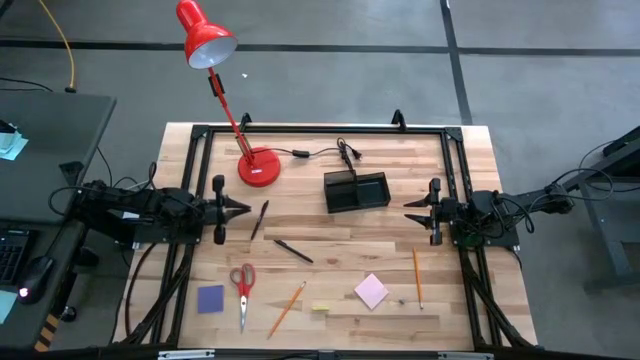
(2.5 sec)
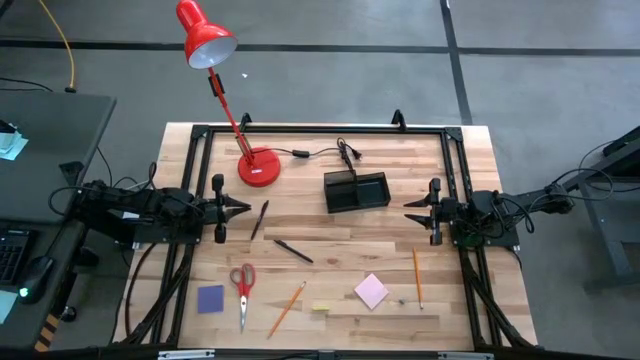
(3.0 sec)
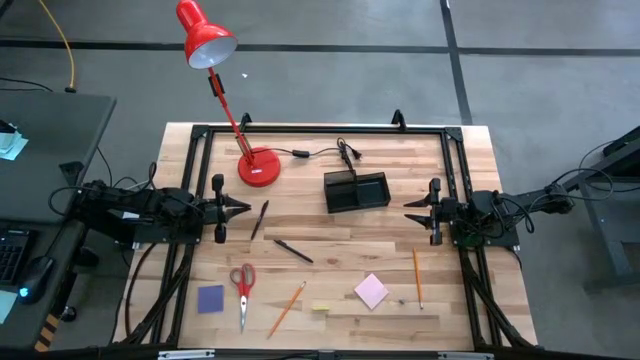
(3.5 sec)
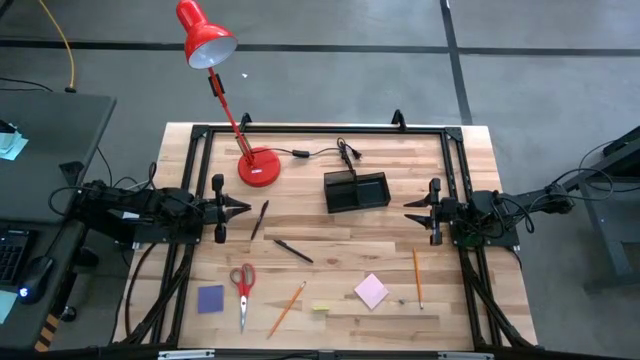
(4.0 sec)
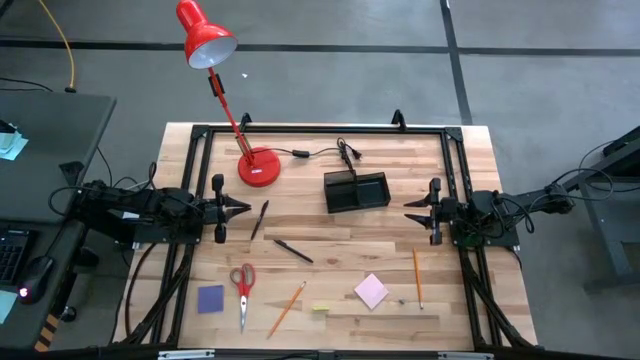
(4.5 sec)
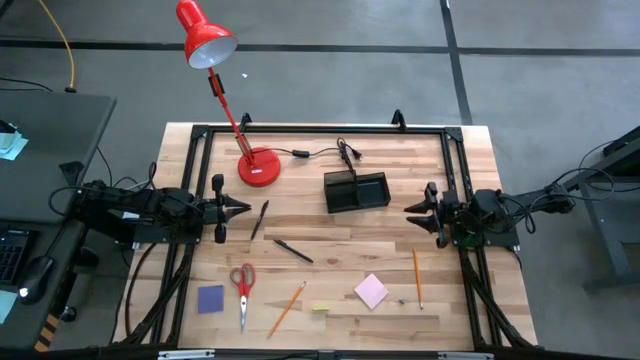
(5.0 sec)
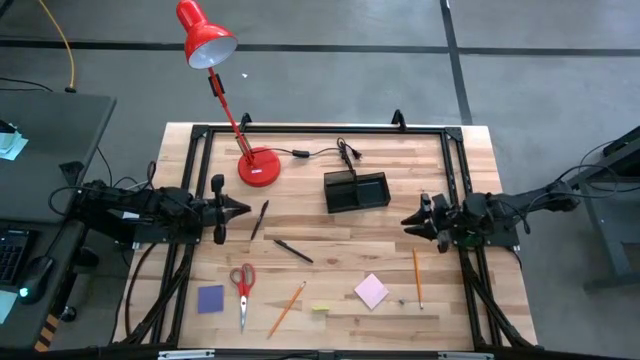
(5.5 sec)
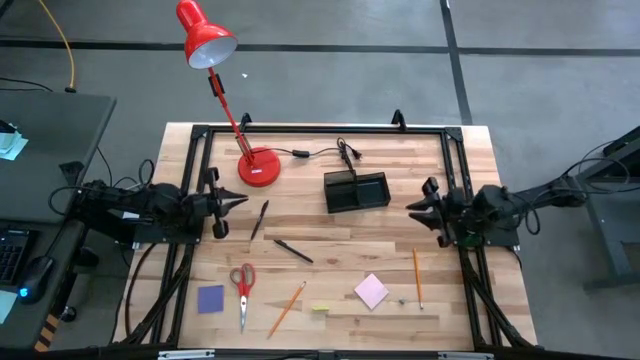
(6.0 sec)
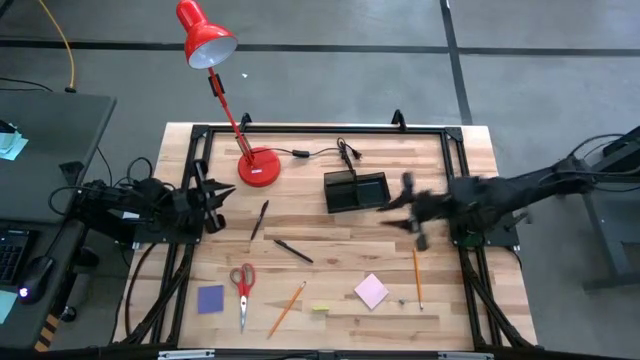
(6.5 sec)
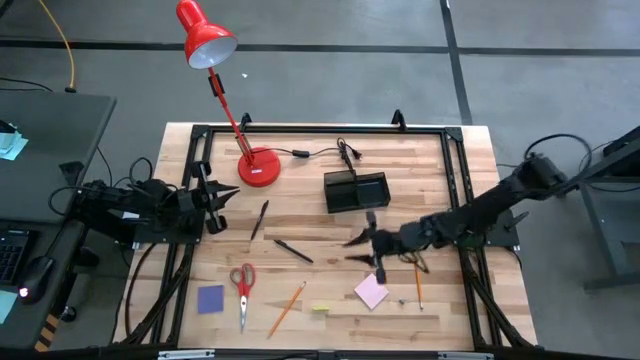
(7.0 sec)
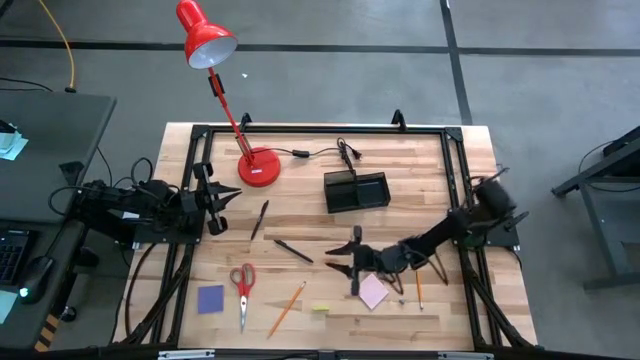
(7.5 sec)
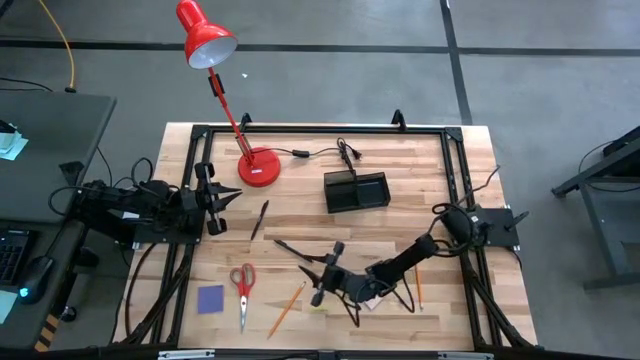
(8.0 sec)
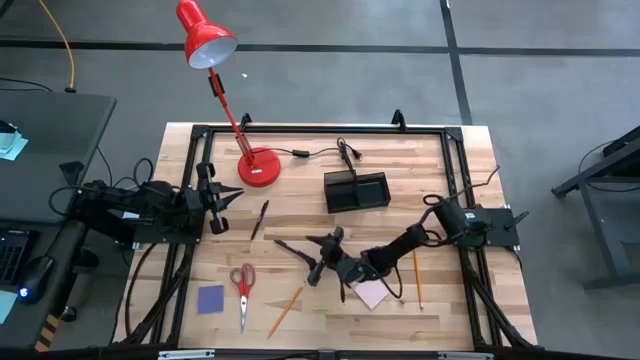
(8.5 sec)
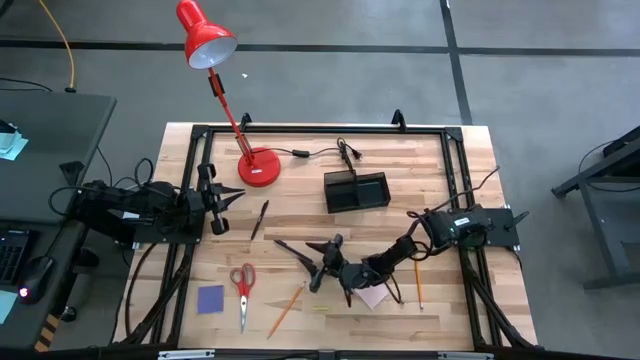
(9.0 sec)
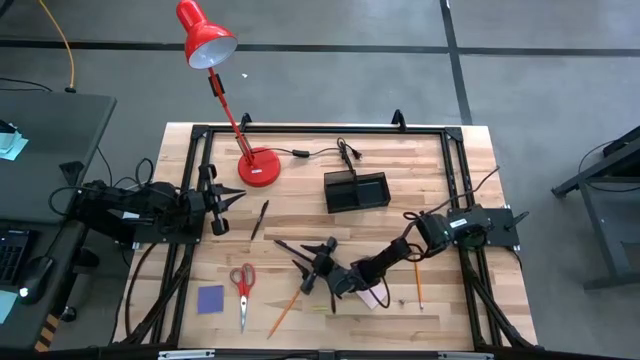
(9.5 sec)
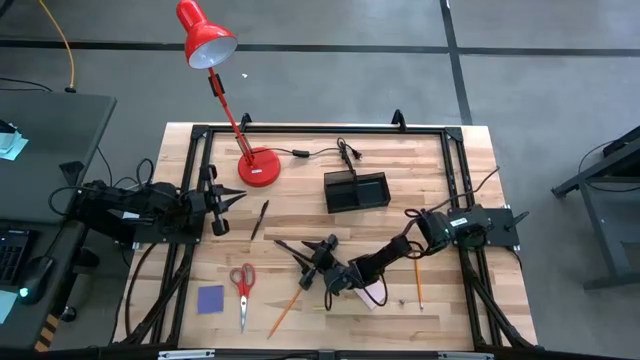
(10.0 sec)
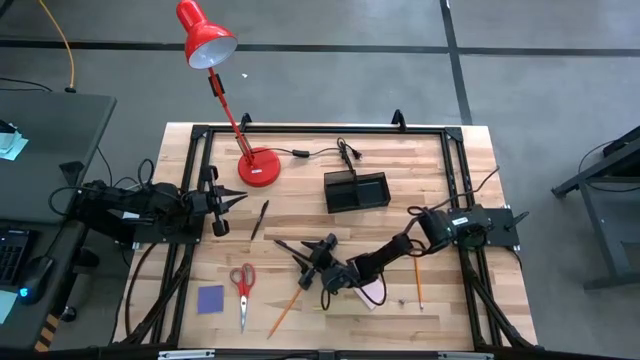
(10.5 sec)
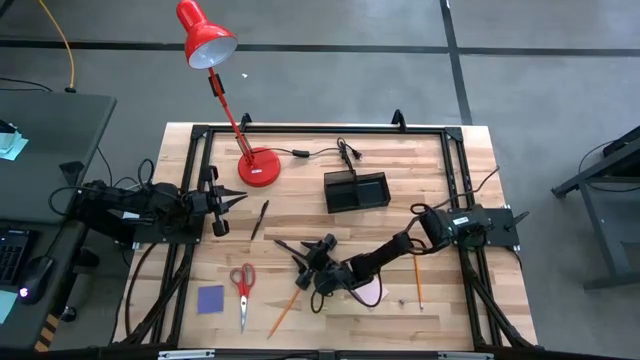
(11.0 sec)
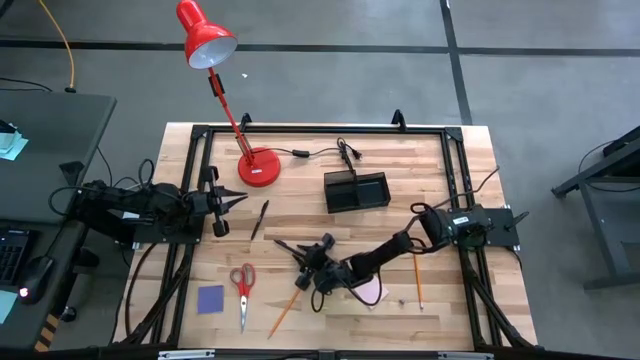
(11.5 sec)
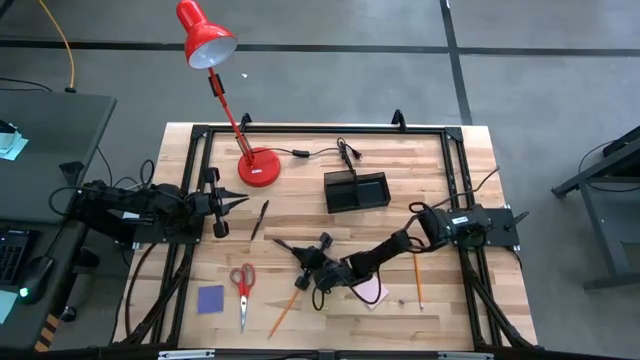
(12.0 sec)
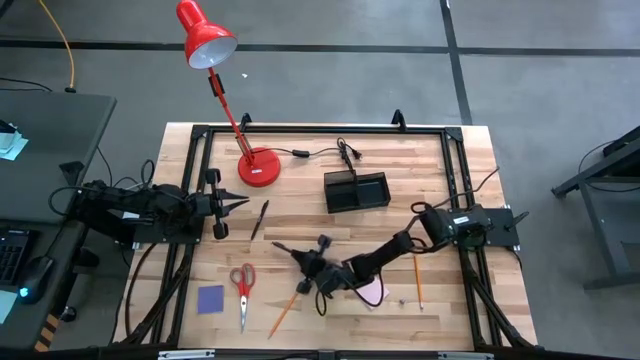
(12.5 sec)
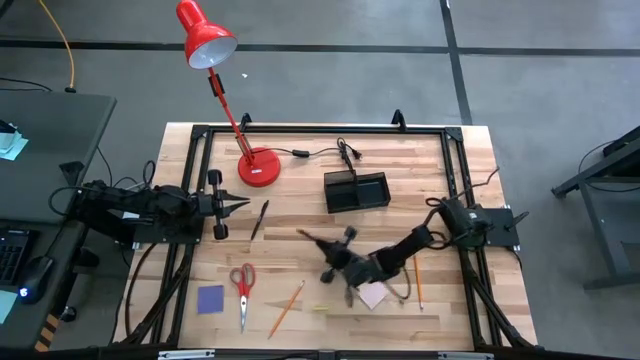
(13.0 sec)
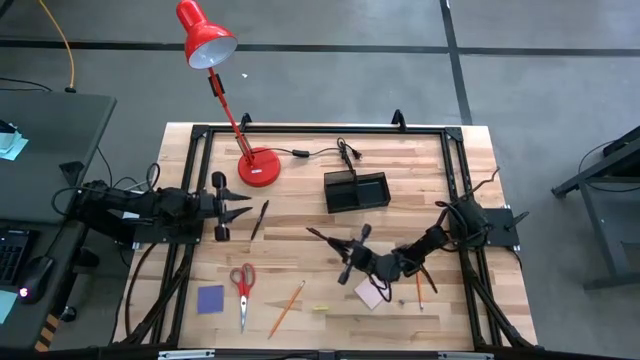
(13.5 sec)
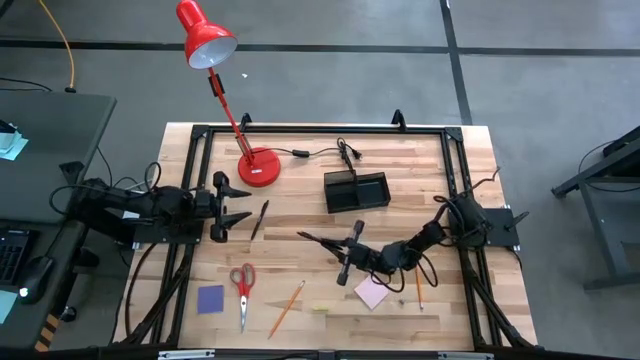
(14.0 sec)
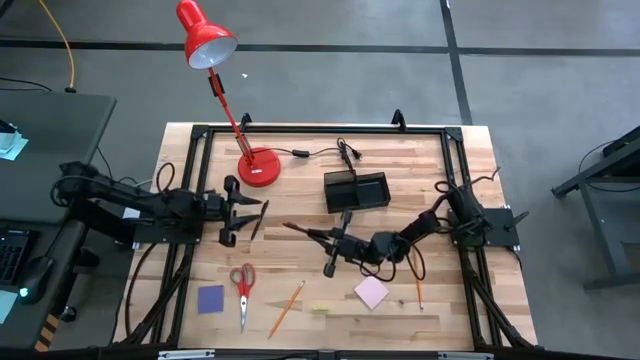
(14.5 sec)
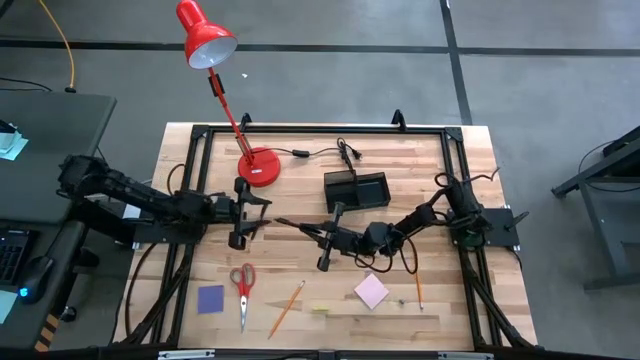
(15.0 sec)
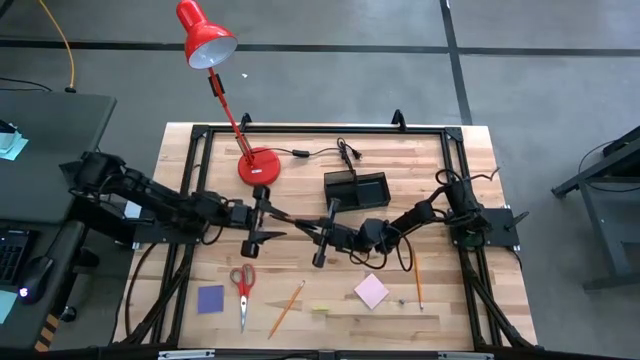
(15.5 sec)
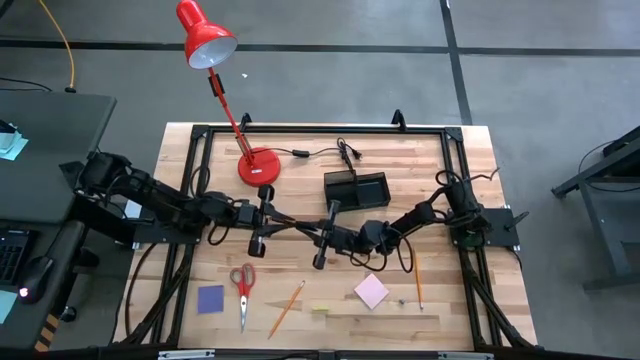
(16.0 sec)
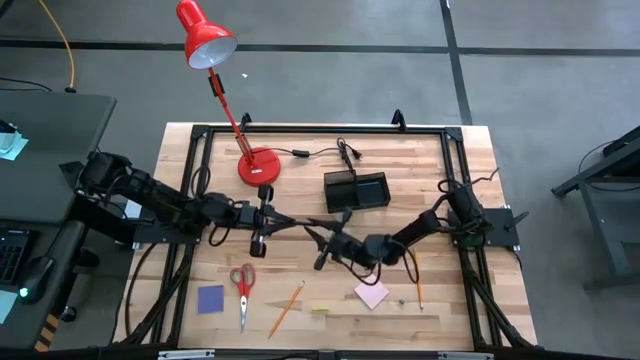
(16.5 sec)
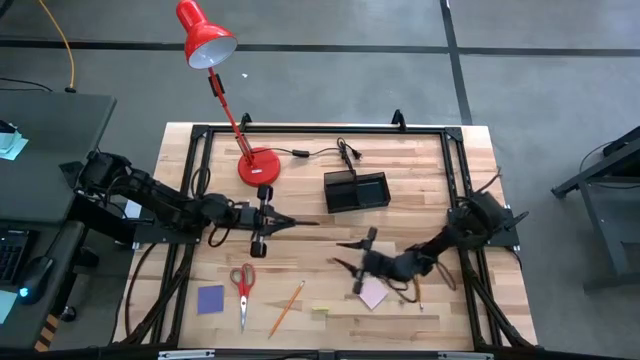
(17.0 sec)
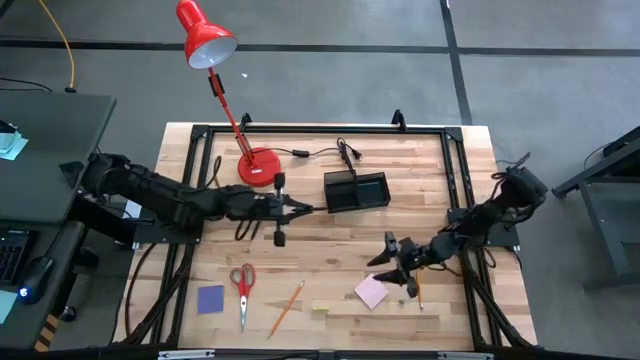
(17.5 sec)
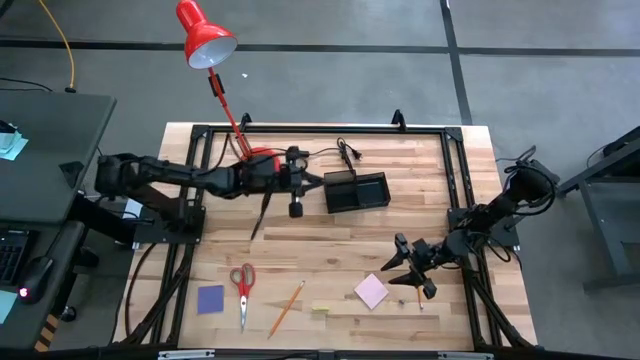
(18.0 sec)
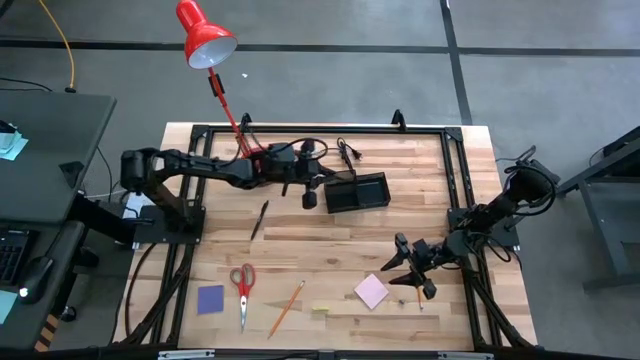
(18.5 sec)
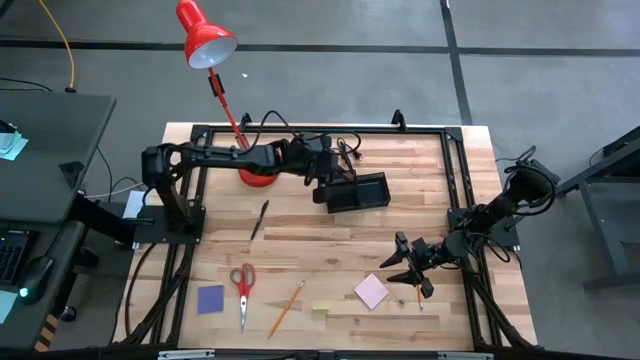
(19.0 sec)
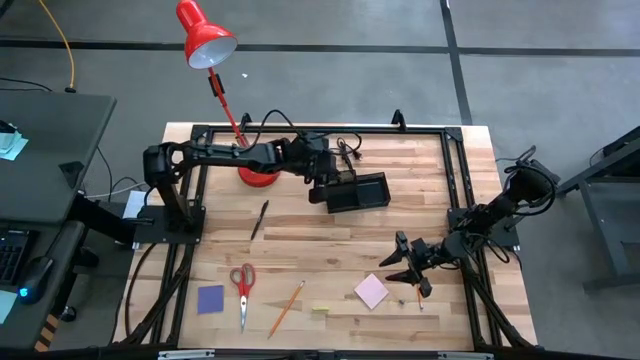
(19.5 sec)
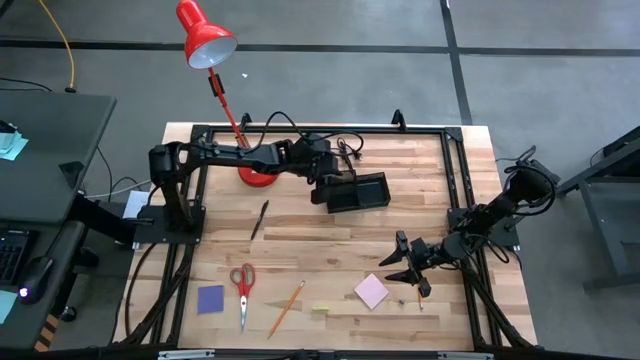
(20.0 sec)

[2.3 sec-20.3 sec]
Task: Pick and place office supplies into organizer
Put the bottom black pen into the desk organizer
